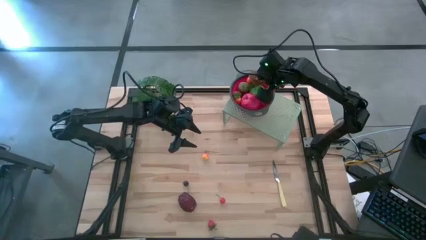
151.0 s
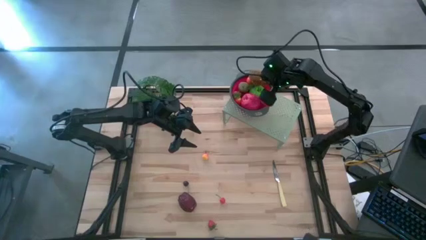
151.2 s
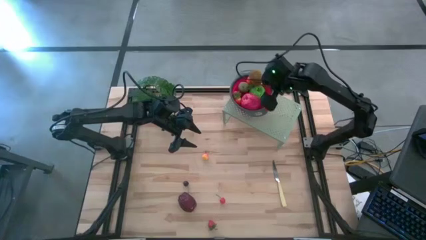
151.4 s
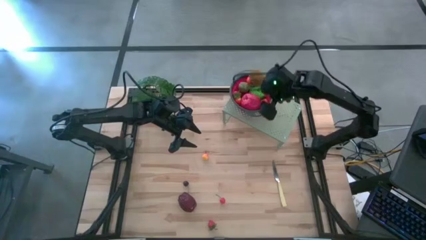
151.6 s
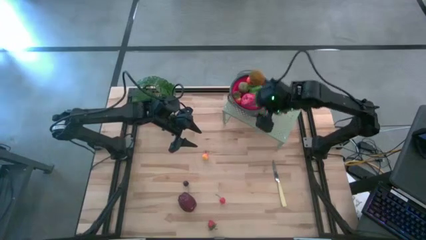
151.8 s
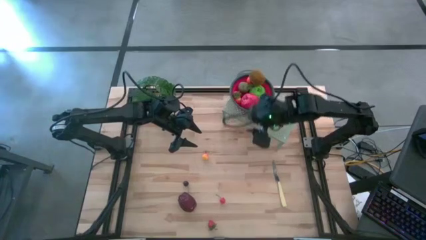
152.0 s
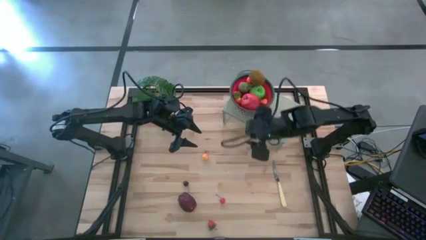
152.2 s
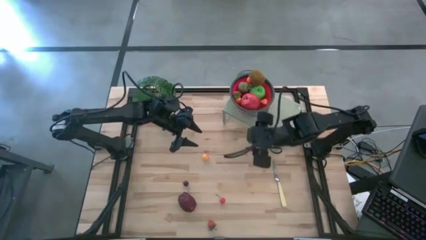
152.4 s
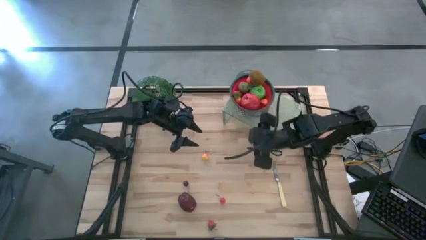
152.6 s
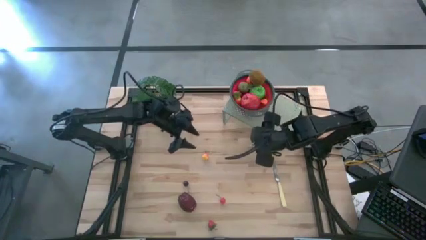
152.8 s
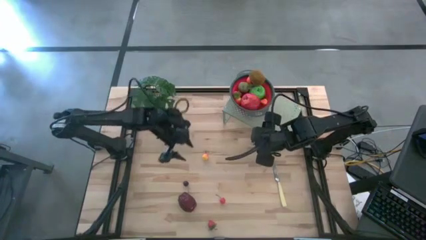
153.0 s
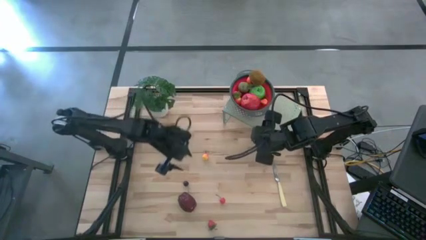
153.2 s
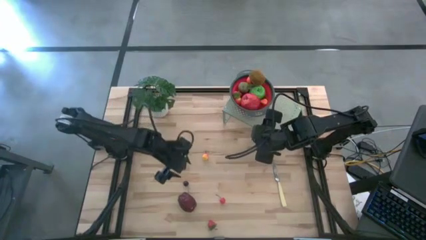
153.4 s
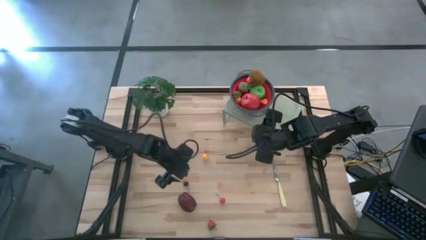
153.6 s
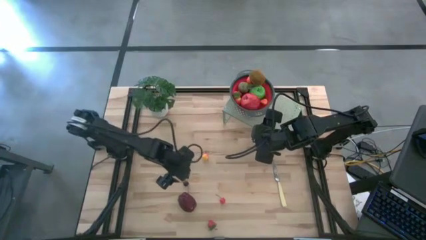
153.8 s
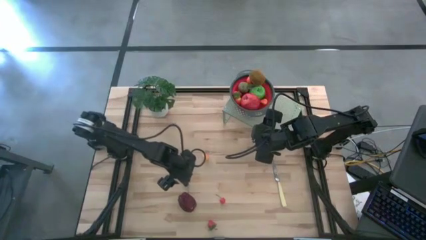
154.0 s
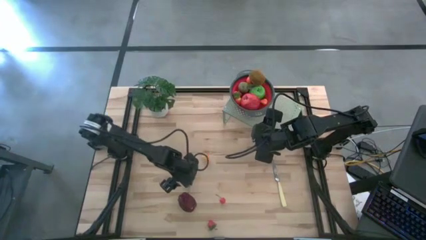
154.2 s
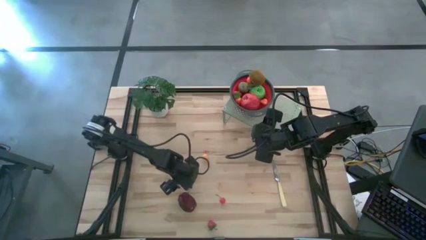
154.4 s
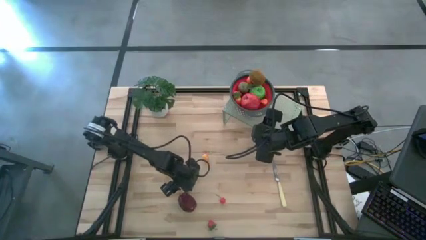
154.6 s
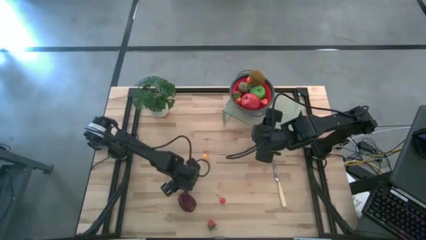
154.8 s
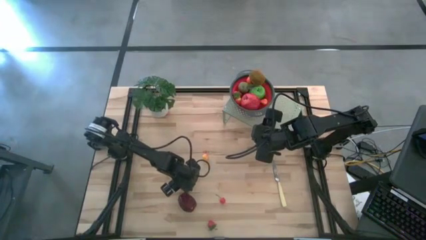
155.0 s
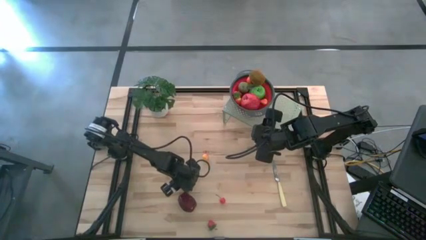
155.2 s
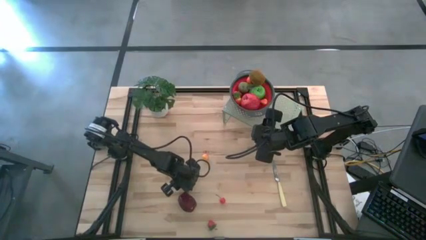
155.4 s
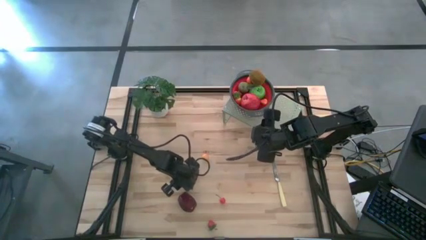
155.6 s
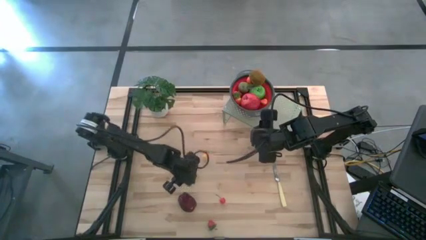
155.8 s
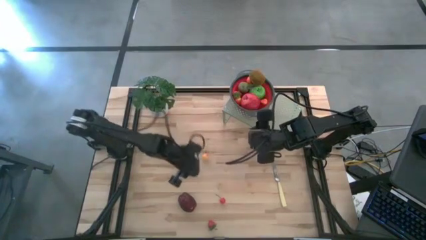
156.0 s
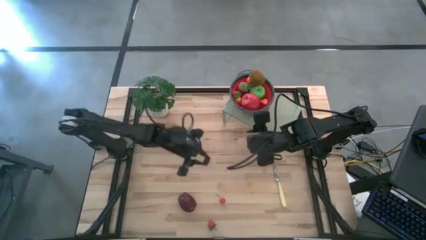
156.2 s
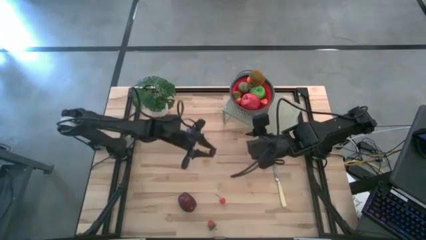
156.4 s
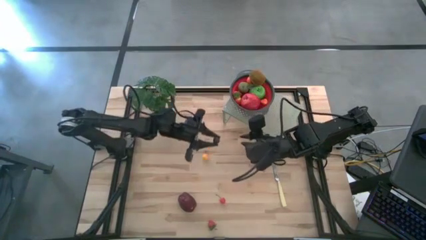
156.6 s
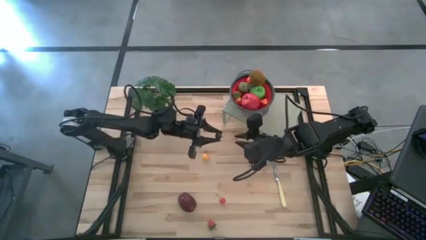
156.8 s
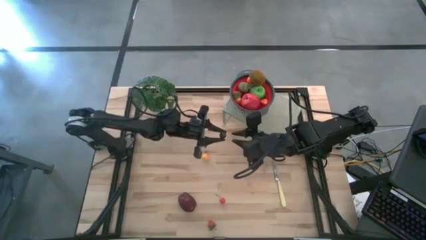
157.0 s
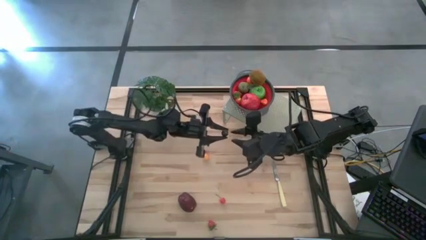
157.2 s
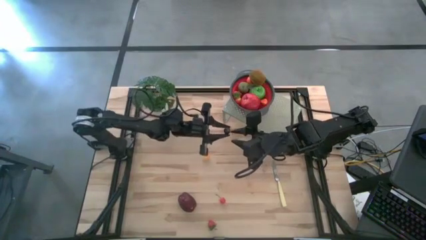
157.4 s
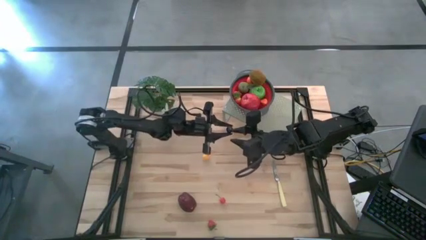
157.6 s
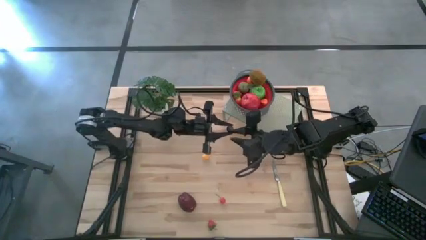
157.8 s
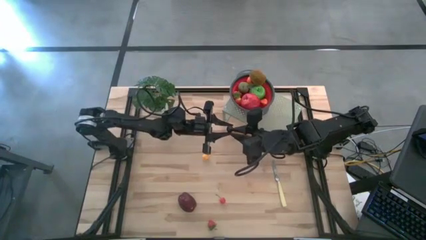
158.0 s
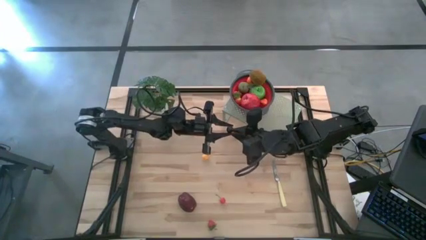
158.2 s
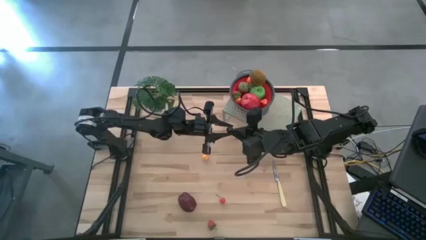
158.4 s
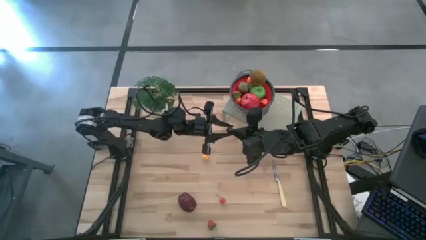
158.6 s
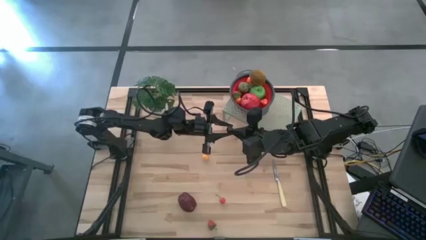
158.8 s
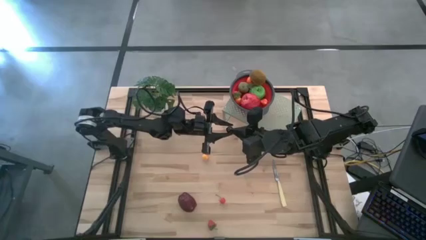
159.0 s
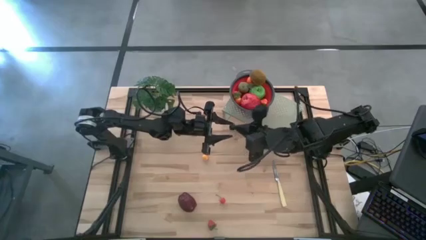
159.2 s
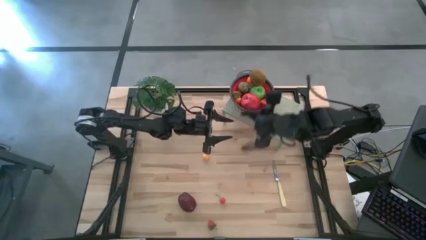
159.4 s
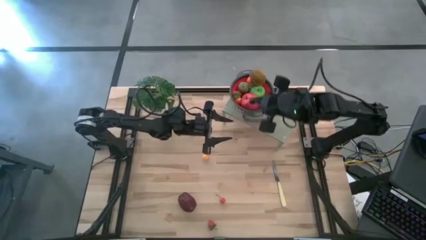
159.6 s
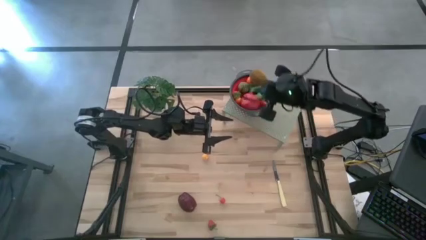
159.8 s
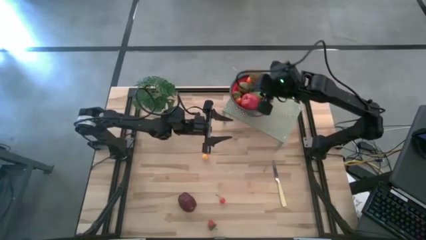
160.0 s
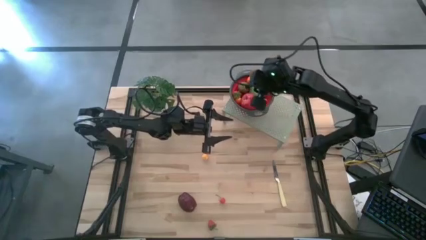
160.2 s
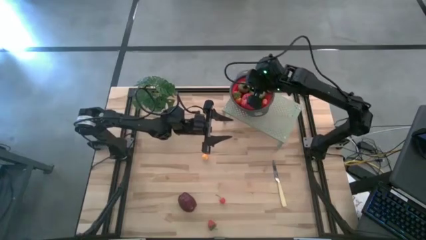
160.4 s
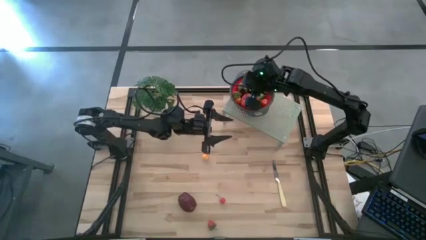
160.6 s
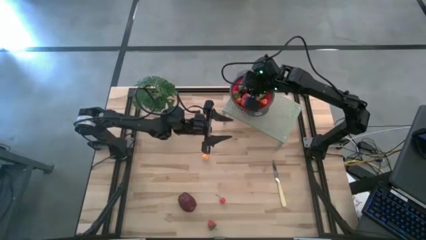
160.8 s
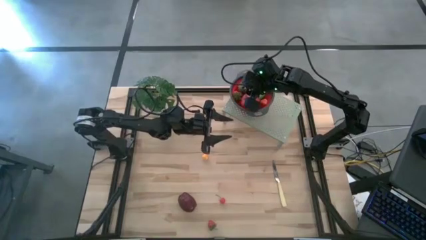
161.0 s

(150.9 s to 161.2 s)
Task: Pick & Place Fruit
Put the black cherry into the red strainer bowl

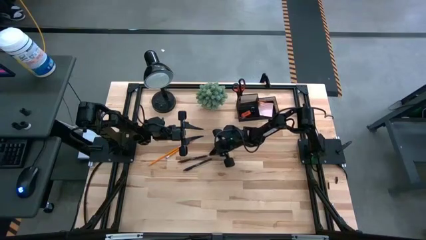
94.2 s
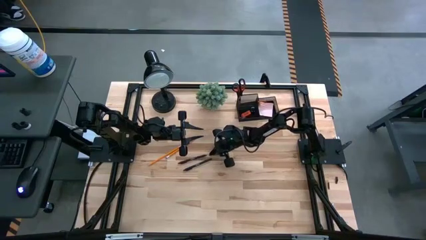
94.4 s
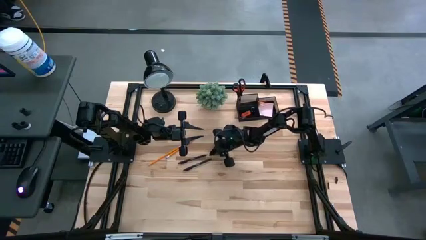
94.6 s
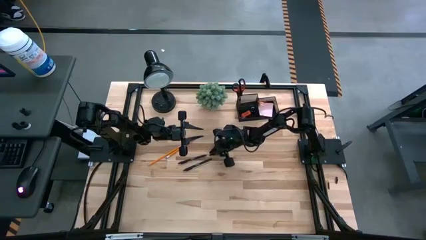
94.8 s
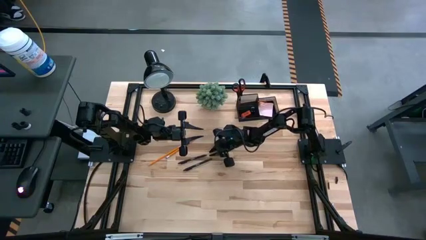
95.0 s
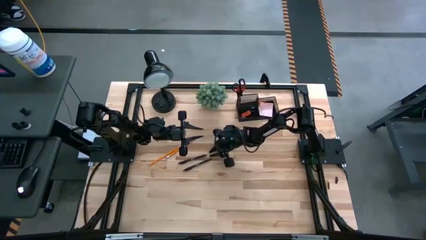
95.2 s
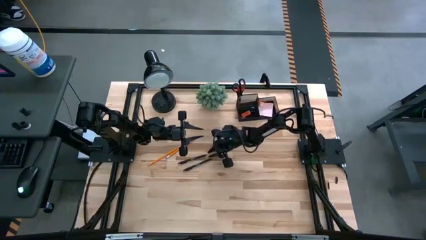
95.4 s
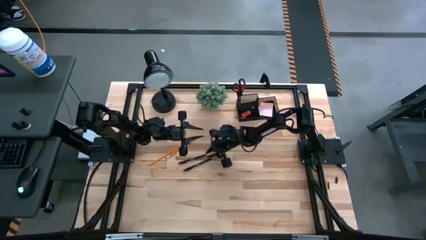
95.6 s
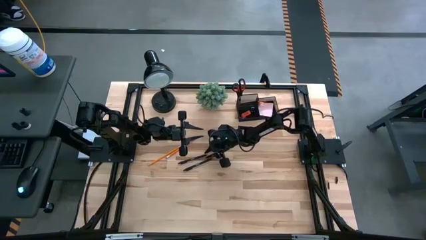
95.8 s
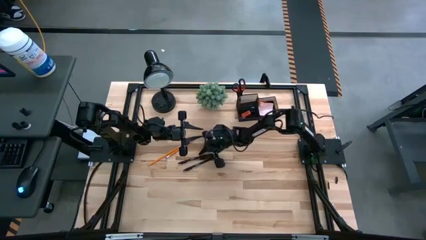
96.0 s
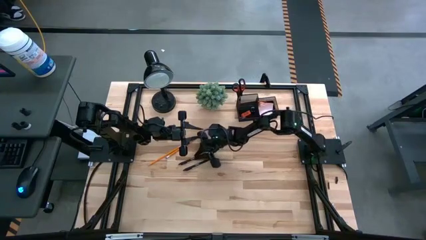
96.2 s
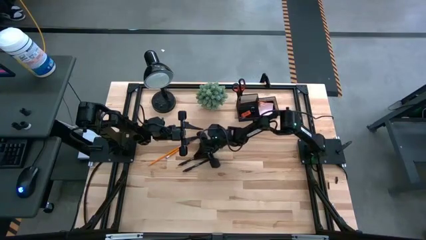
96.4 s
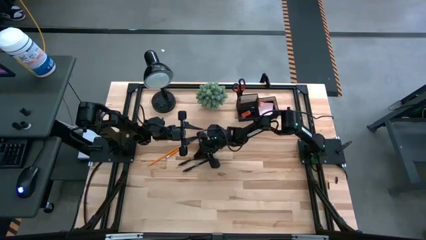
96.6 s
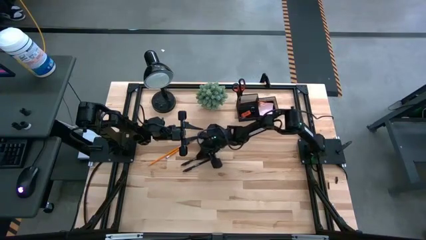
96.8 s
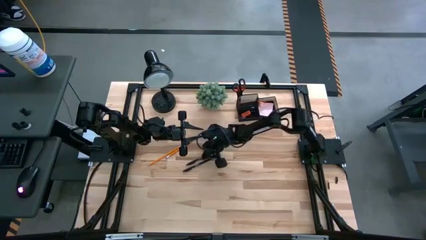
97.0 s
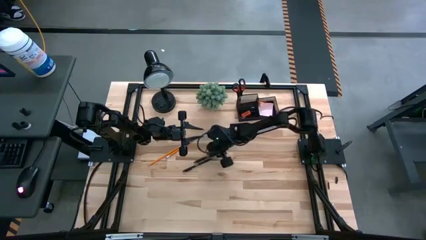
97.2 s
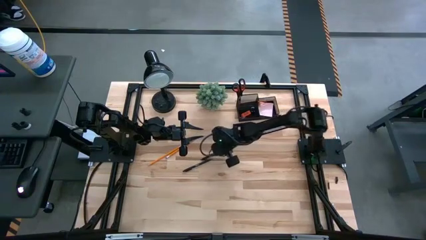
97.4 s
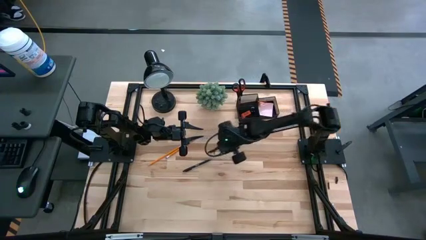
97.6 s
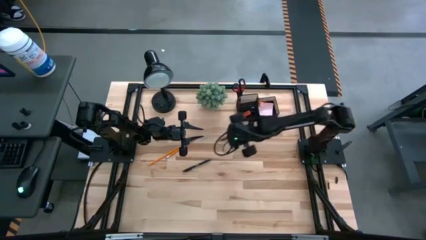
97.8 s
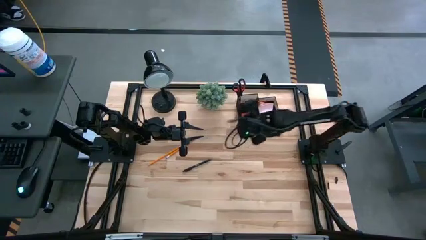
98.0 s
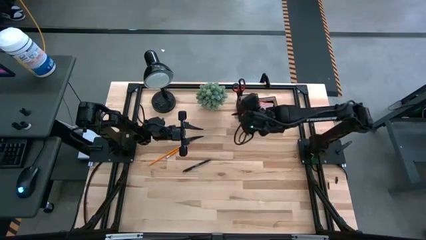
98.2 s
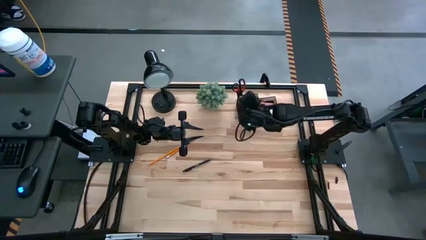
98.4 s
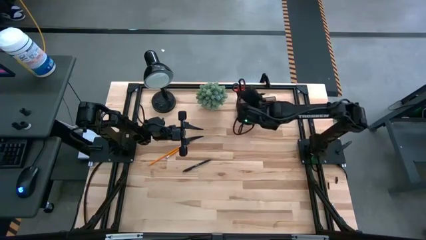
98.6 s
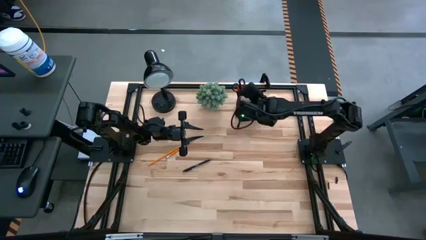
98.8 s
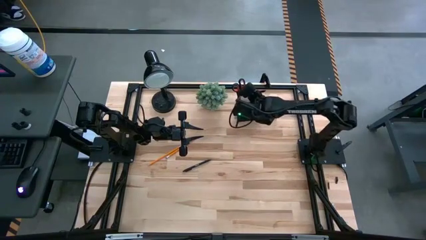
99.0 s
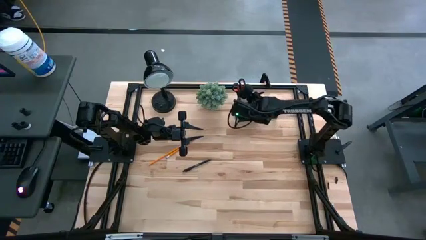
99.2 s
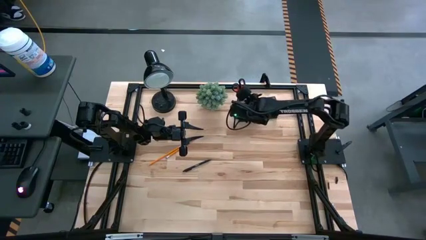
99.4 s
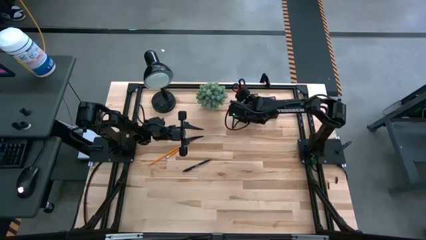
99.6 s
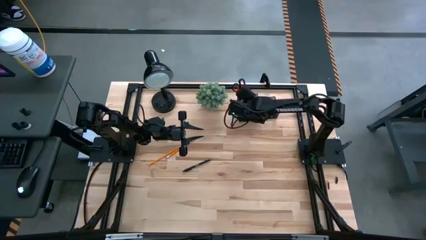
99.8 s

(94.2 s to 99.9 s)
Task: Pick and place office supplies into organizer
Put the top black pen into the black desk organizer
